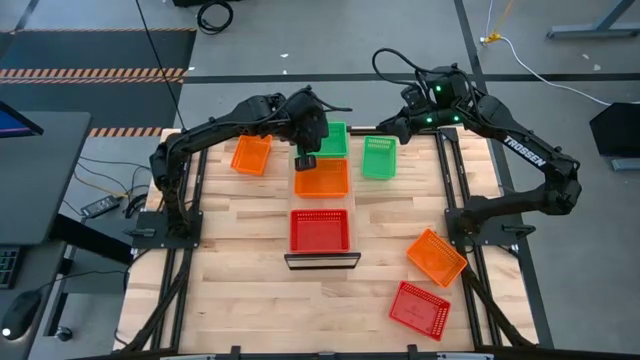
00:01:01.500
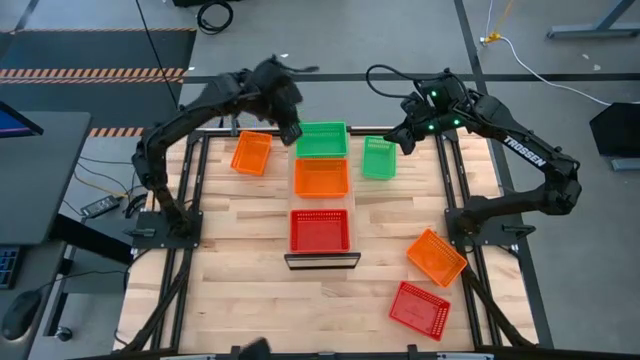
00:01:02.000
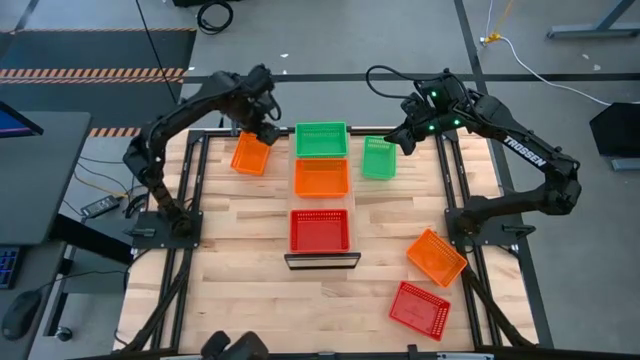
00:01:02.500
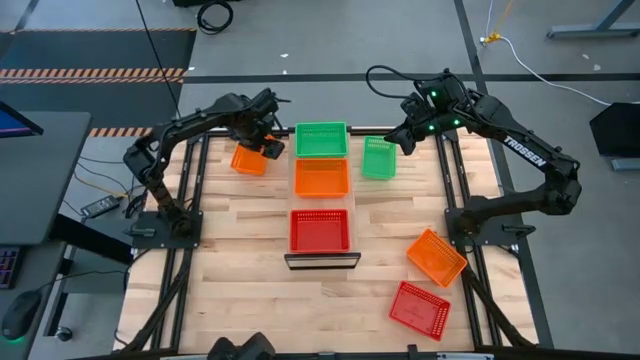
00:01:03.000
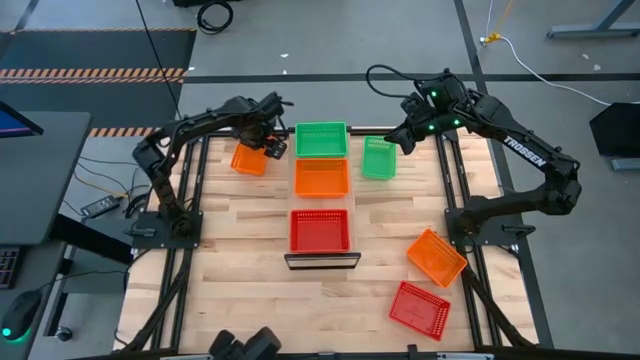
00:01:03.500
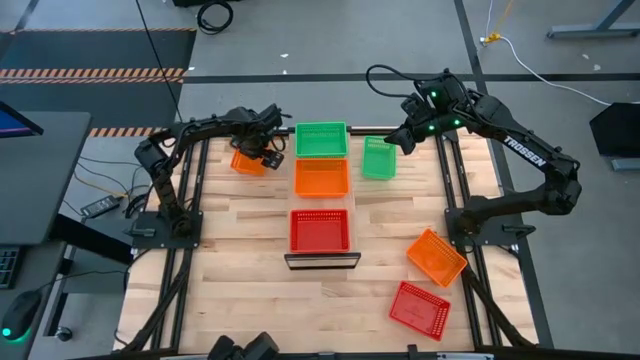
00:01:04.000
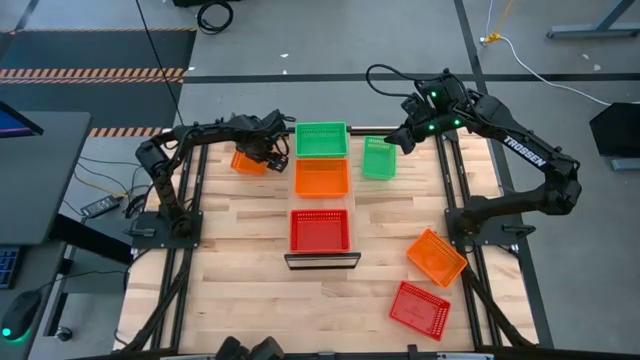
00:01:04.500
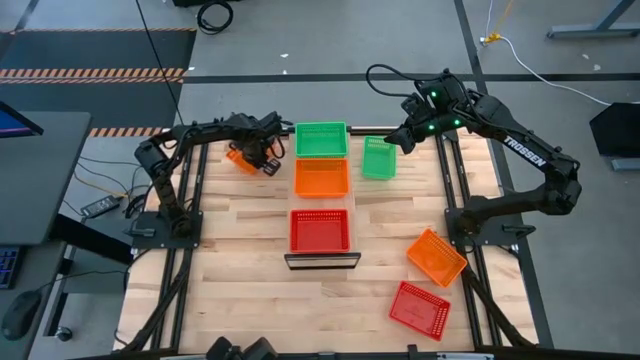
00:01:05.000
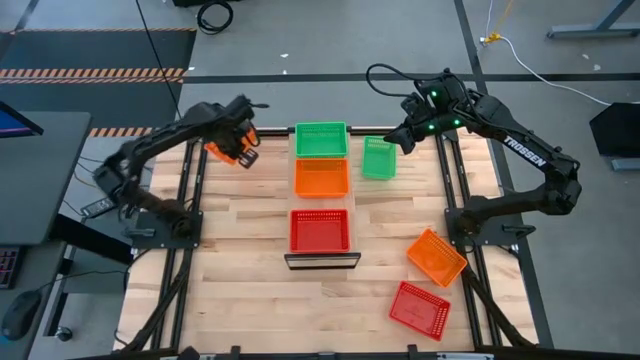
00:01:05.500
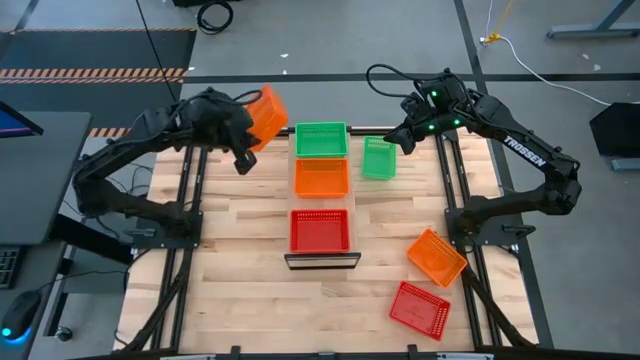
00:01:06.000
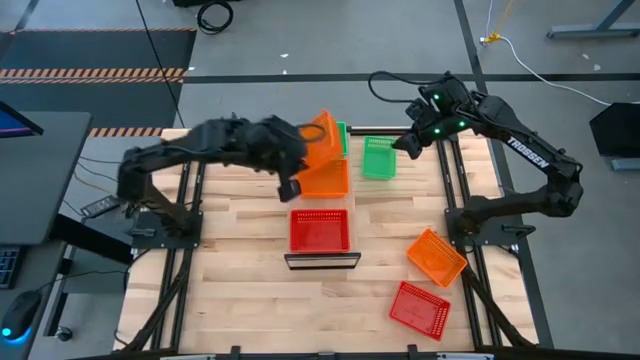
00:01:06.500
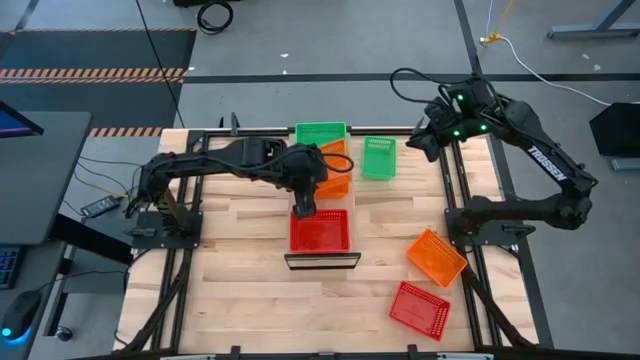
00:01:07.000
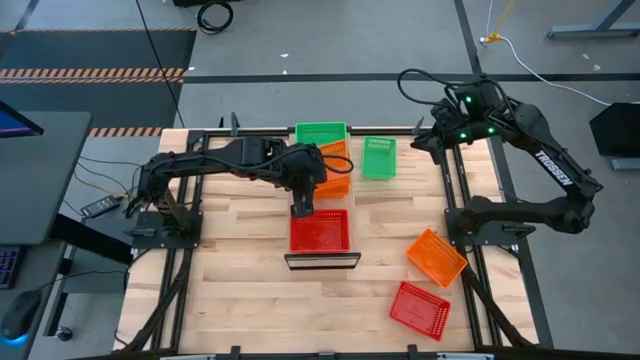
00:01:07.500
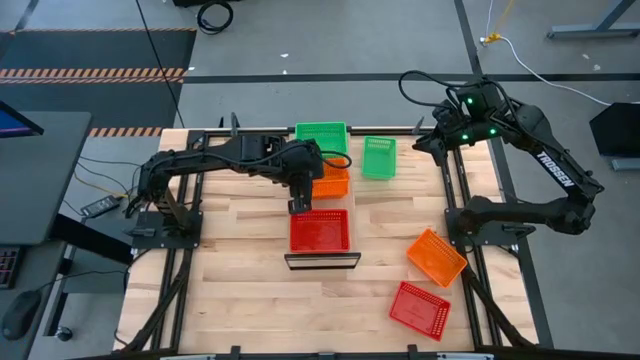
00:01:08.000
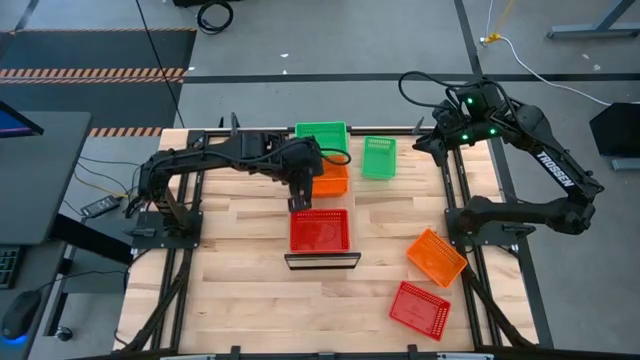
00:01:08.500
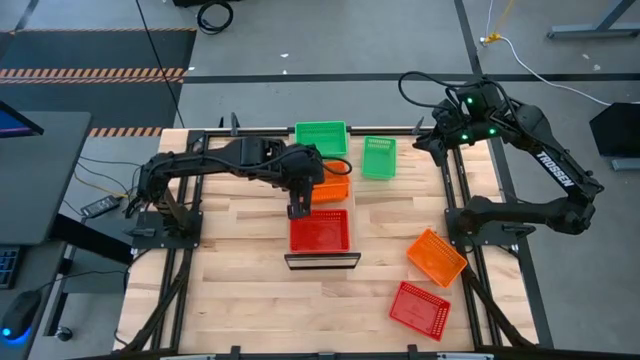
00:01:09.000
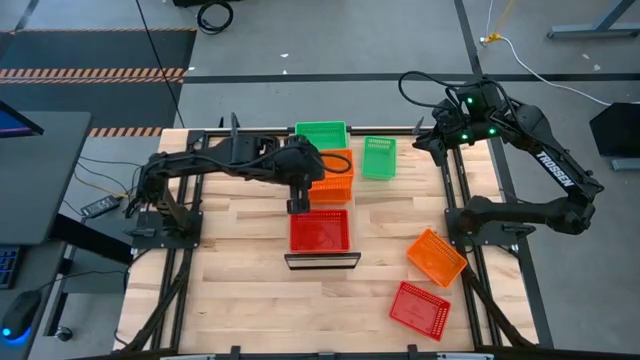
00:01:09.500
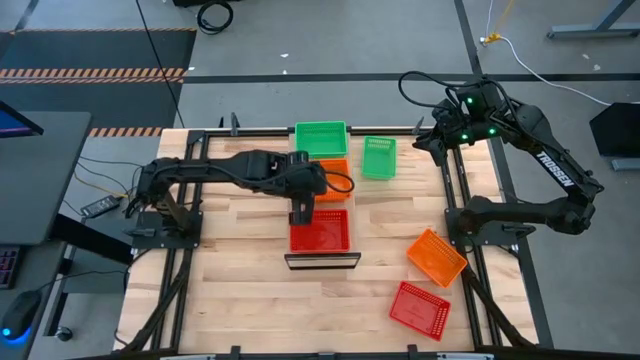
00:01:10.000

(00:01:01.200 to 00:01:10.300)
Task: Stack baskets on shelf by color
Stack the top orange bin on top of the orange bin on the shelf

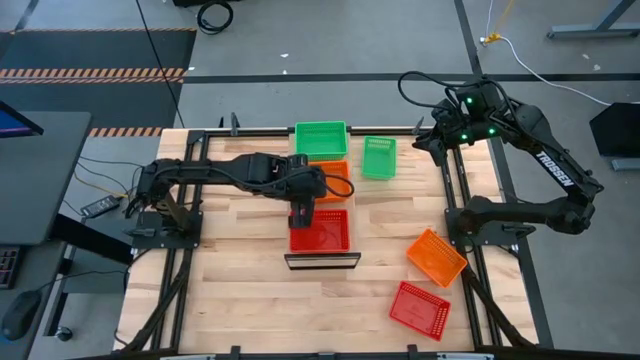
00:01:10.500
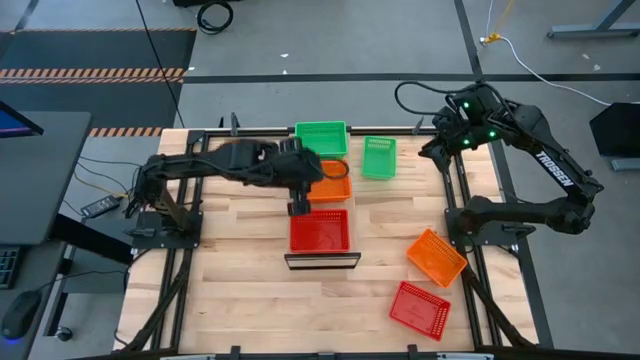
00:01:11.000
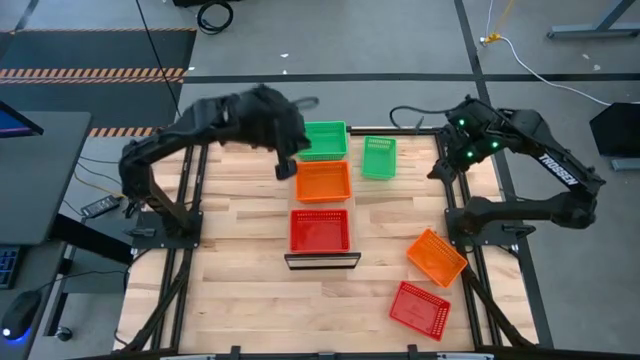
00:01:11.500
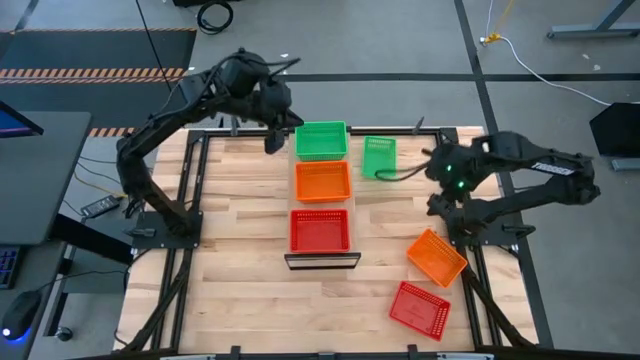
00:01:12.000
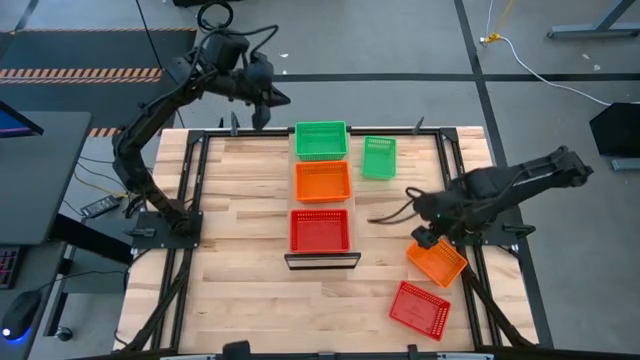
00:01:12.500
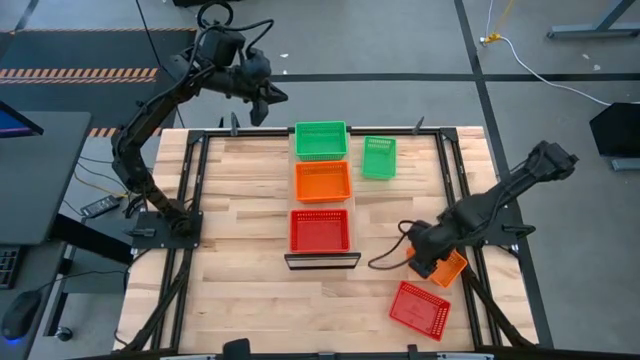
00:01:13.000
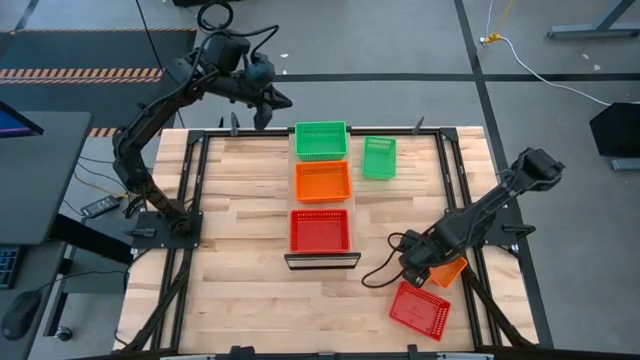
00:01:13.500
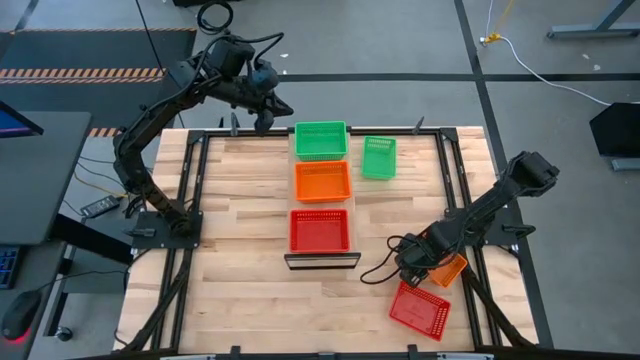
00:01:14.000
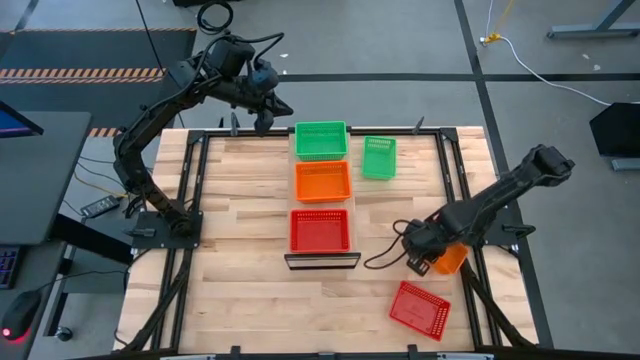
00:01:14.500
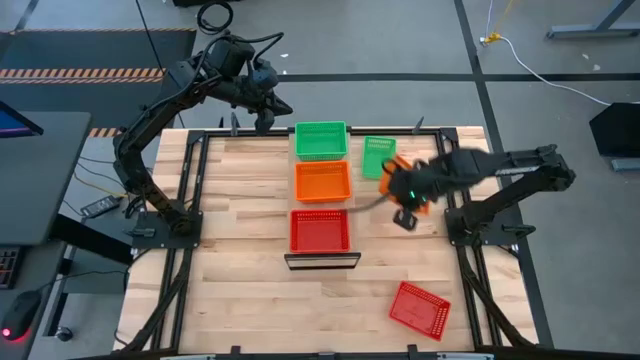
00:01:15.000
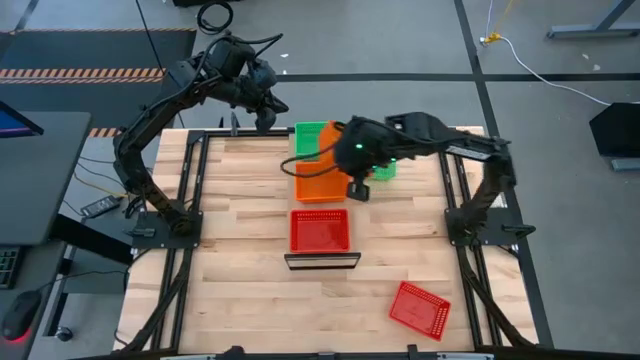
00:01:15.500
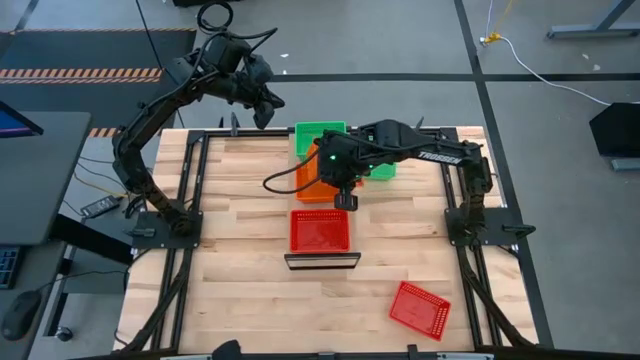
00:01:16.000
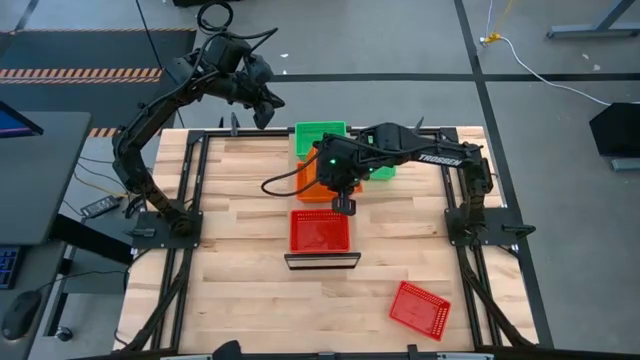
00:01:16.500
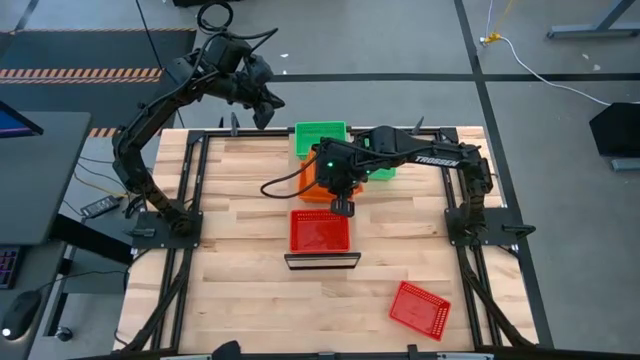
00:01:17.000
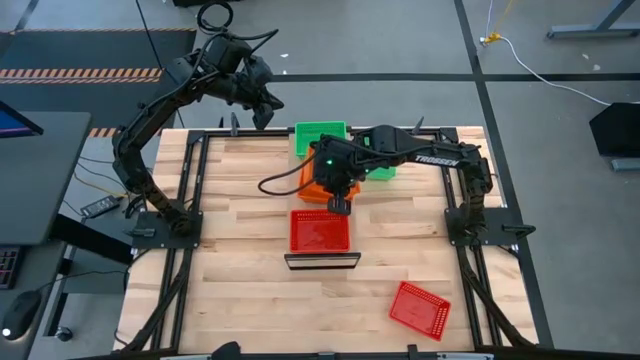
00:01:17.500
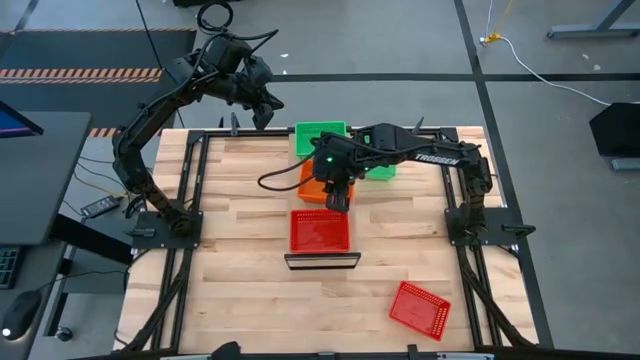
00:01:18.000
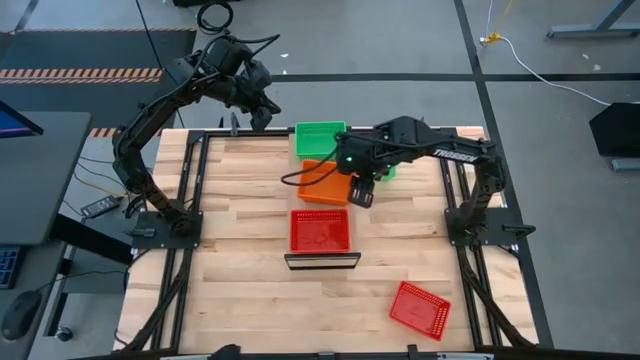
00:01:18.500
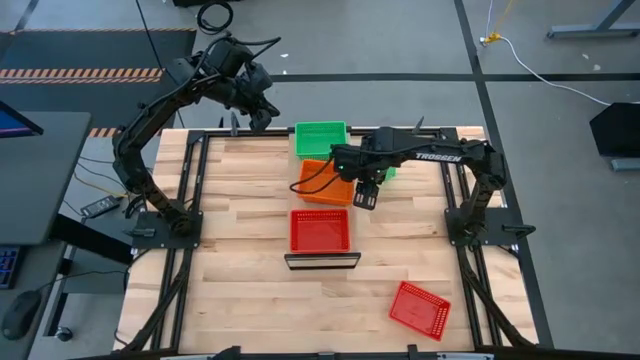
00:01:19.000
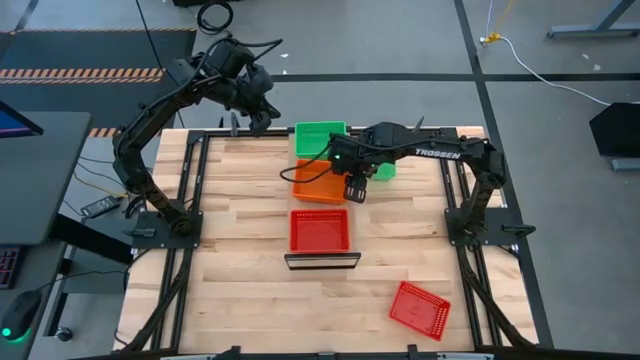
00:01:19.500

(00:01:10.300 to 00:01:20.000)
Stack the orange bin on top of the orange bin on the shelf

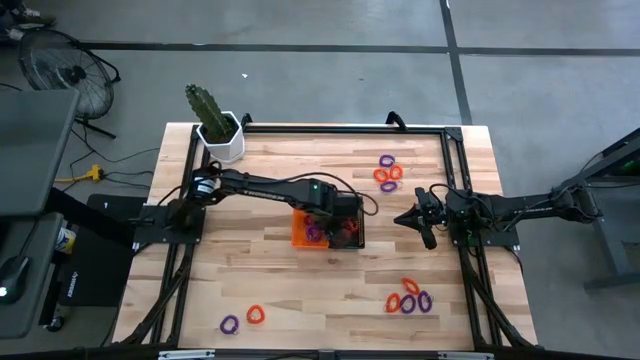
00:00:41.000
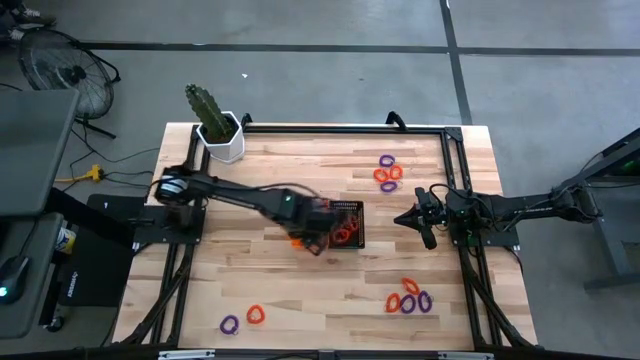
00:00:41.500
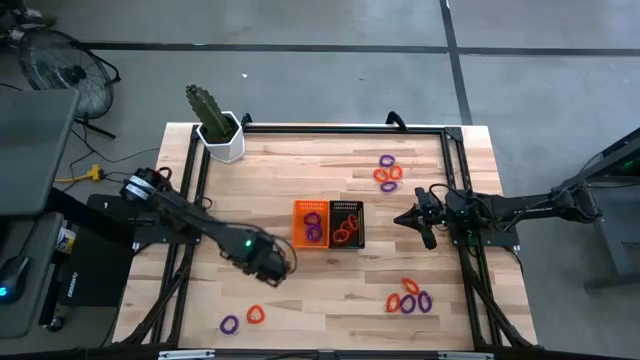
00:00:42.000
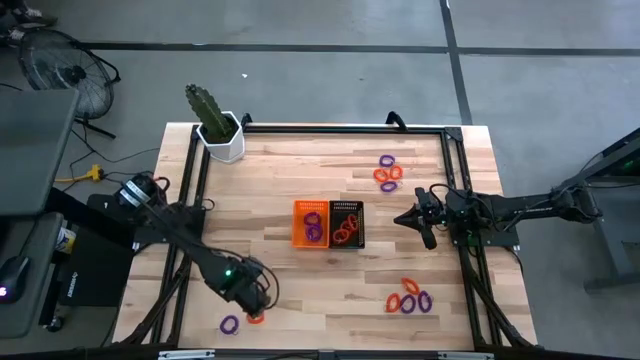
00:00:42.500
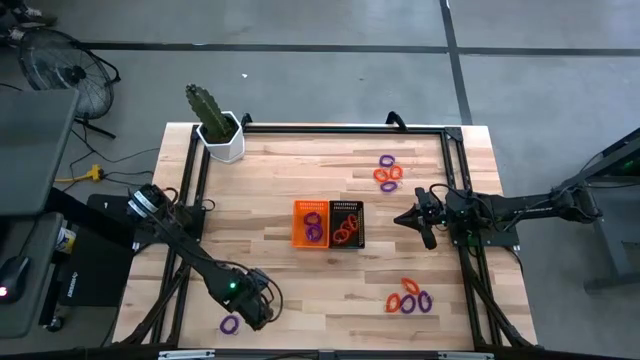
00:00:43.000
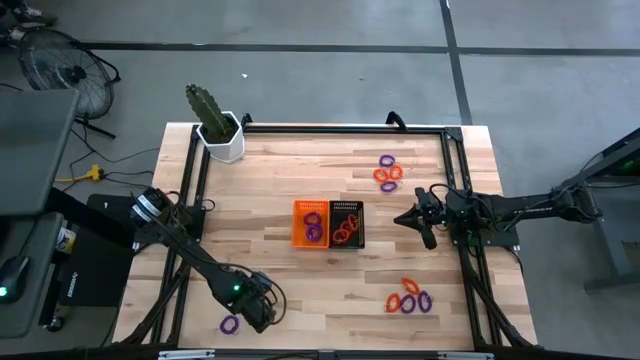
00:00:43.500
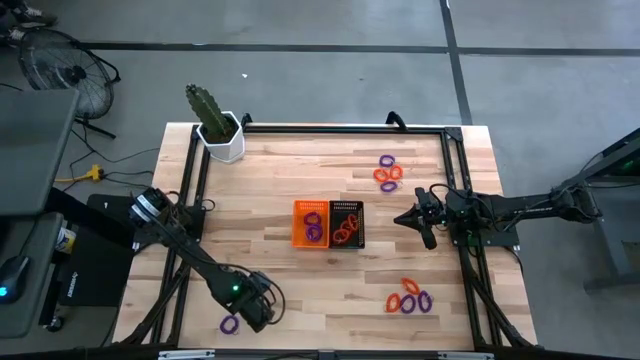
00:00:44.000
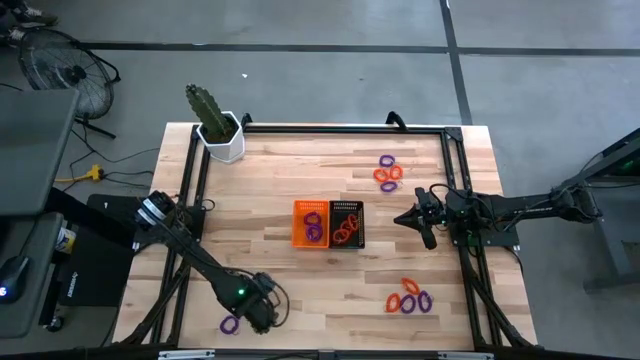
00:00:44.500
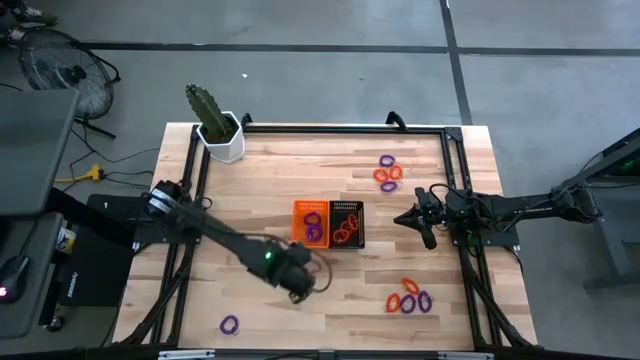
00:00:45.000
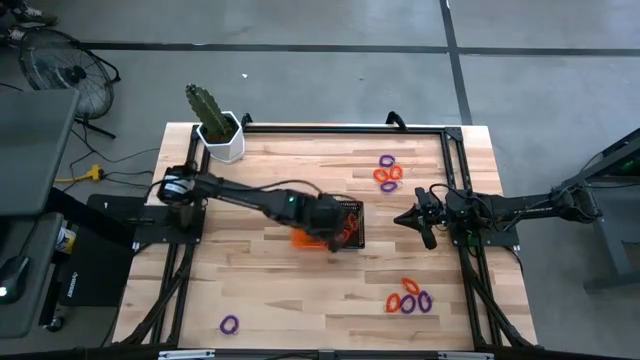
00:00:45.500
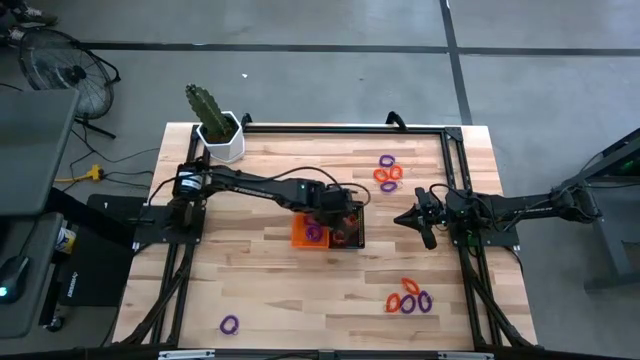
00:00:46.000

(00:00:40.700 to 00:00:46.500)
Task: Sort spring keychains
Put the orange spring keychain into the black bin
